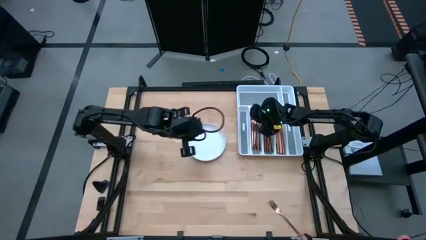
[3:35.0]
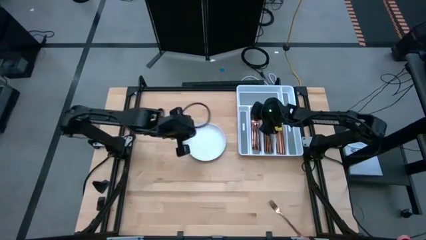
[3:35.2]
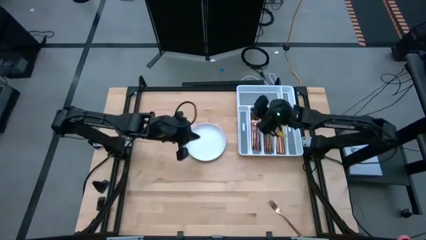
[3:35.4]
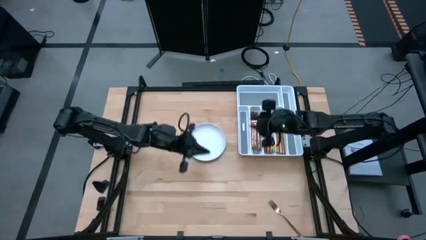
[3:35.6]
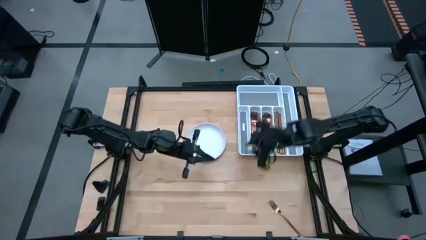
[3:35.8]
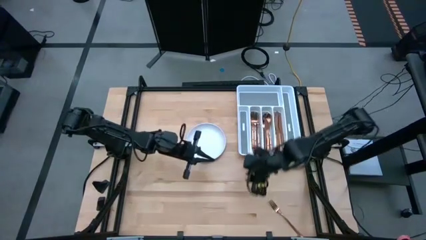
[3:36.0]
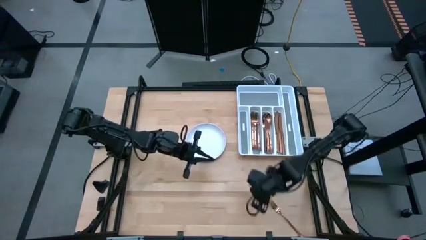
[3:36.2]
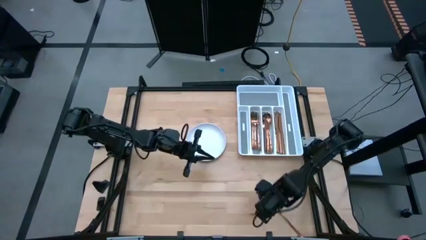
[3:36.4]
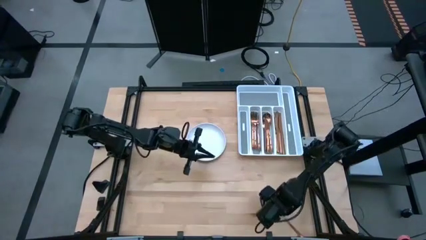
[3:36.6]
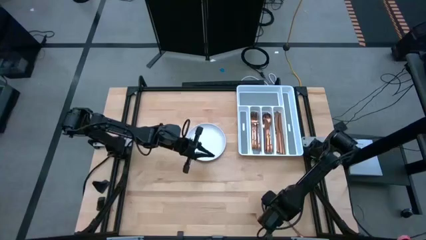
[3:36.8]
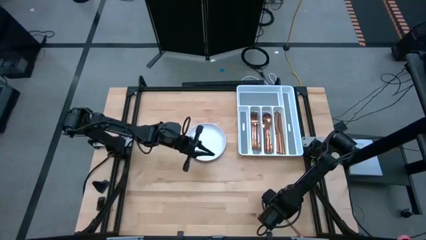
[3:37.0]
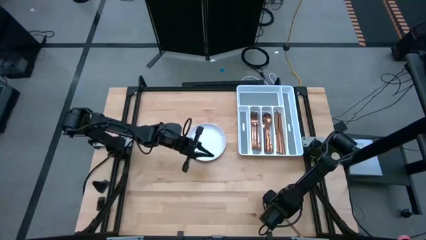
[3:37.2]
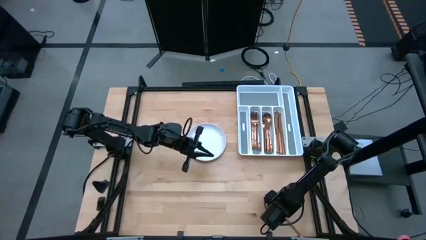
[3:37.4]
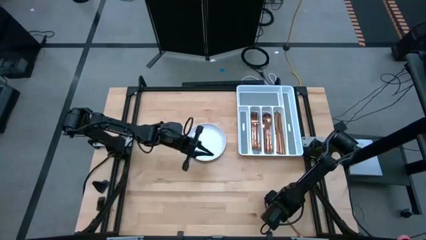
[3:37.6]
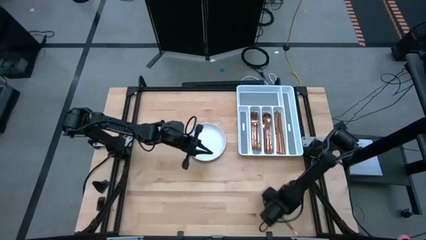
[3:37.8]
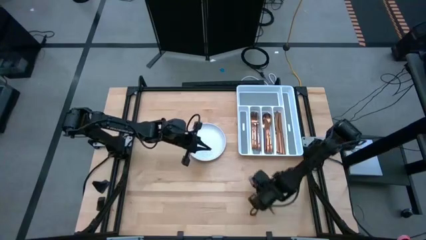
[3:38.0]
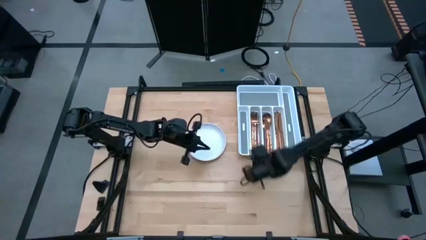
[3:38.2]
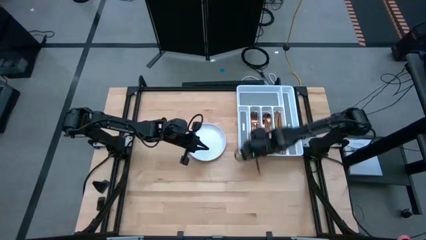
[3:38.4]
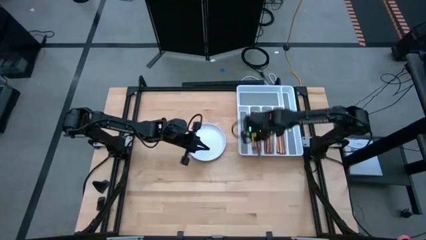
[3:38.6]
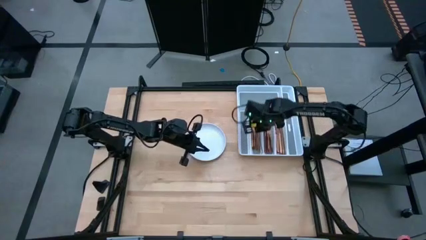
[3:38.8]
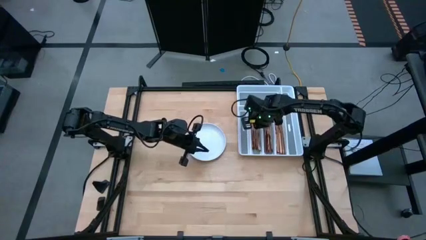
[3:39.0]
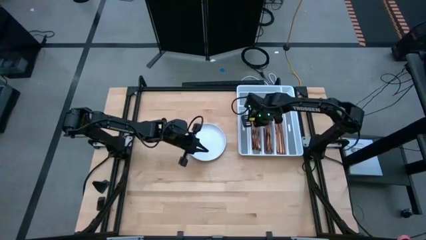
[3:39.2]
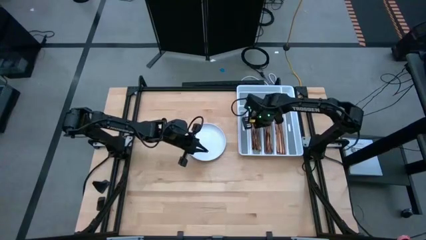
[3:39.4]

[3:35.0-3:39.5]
Task: Sort silverware
Put the fork in the silverware tray

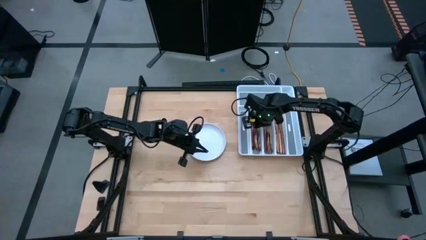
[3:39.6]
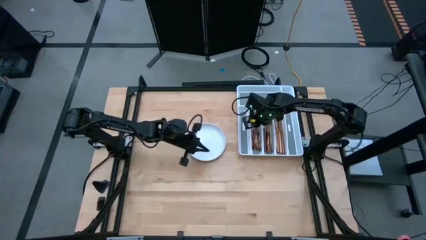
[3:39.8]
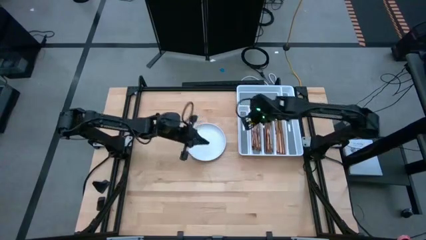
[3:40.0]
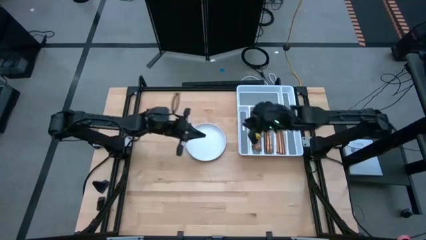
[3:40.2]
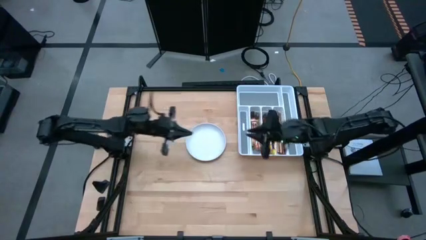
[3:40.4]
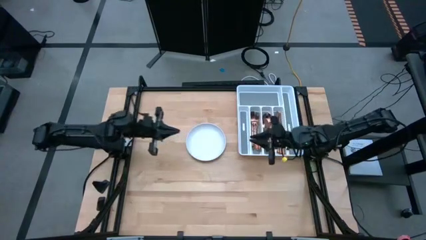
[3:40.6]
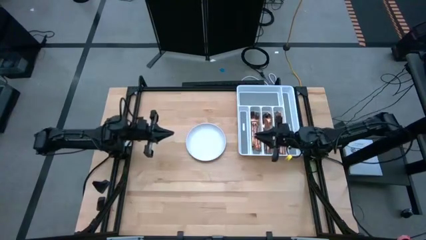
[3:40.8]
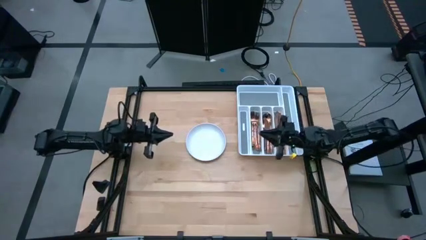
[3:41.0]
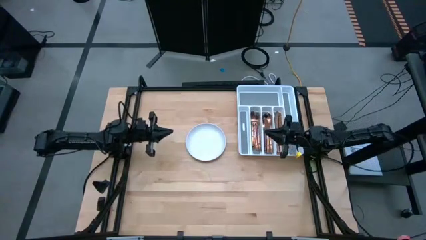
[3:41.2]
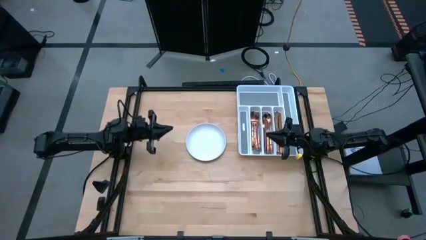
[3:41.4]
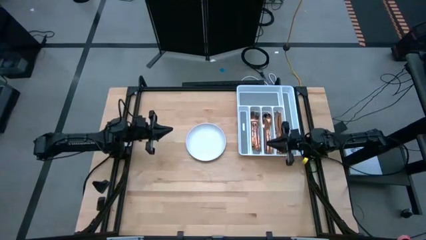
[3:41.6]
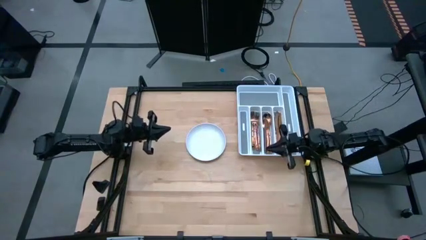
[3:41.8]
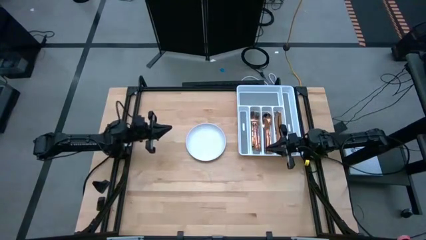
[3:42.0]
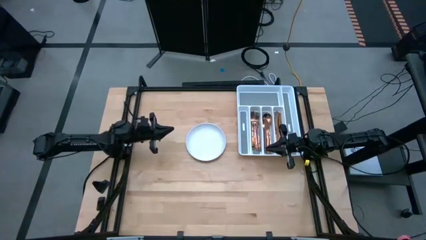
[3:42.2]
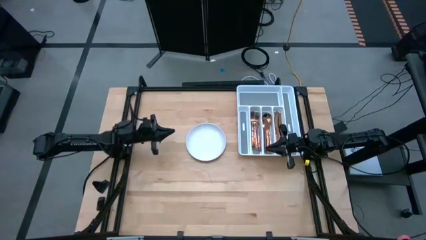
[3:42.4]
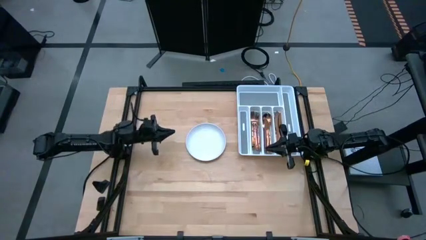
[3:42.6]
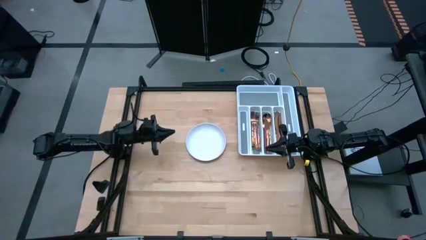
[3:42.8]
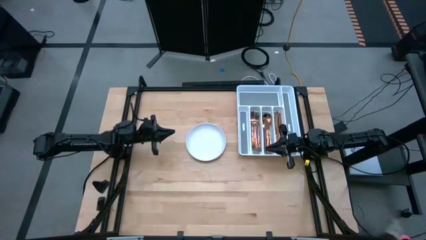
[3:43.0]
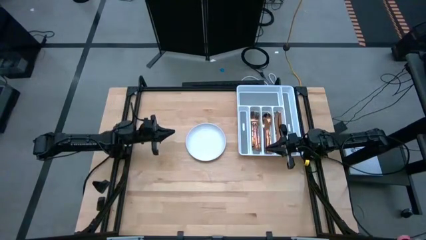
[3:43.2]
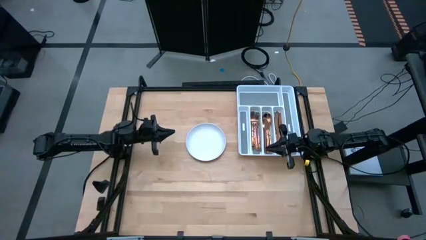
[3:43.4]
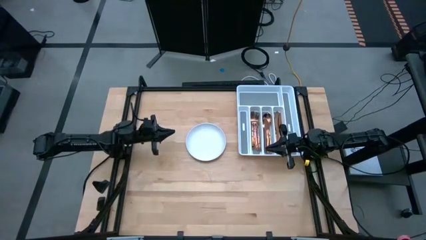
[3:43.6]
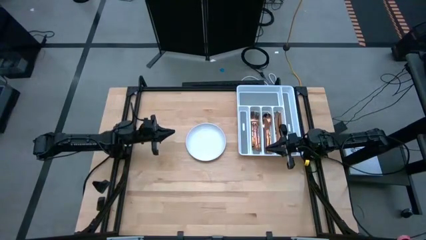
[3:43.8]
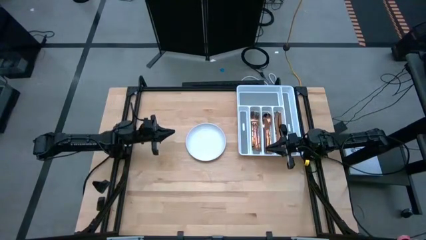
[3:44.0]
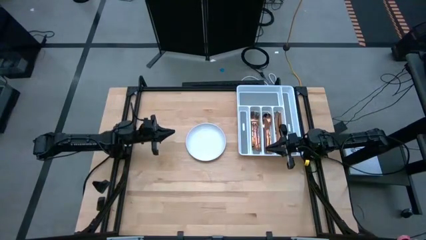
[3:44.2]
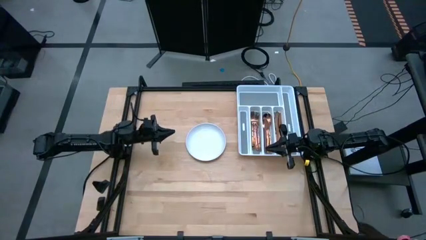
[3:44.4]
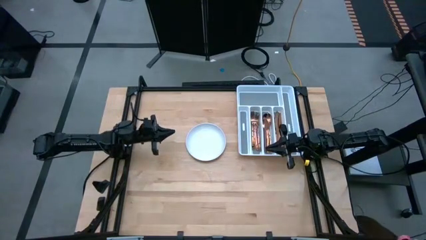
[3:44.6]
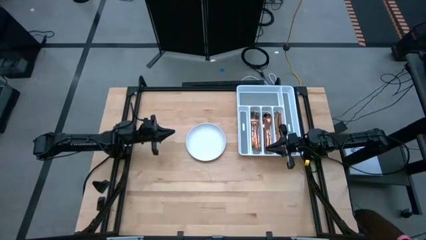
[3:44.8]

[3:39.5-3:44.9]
Return to Home Position

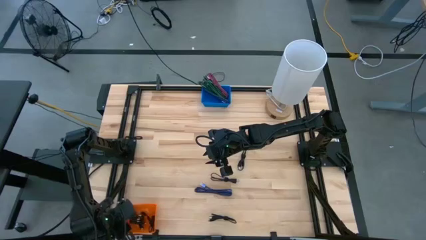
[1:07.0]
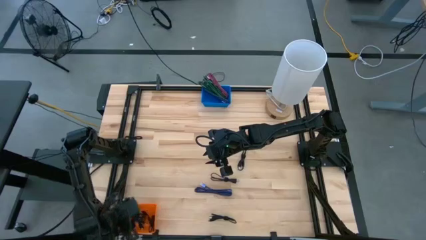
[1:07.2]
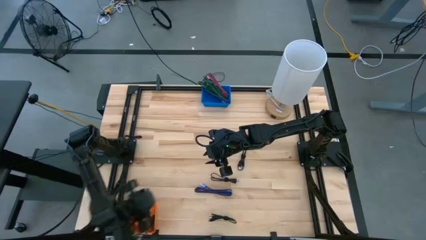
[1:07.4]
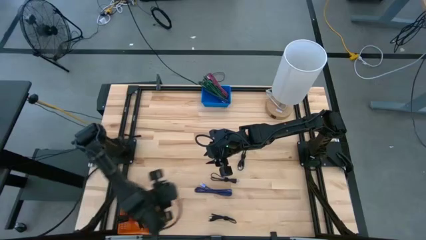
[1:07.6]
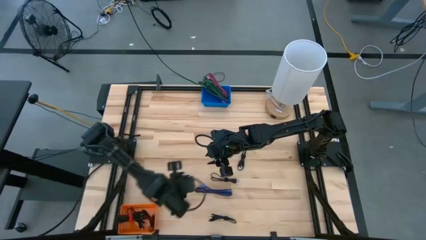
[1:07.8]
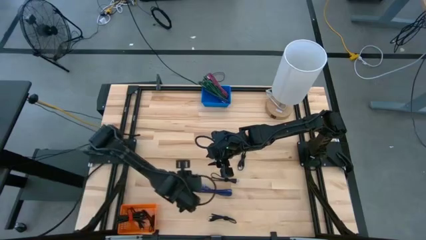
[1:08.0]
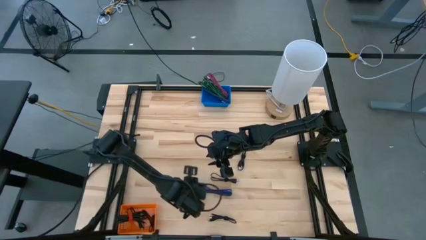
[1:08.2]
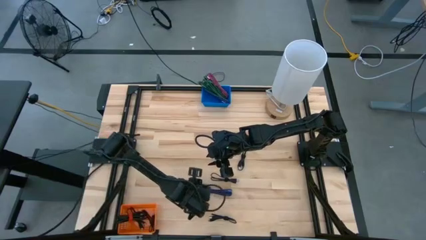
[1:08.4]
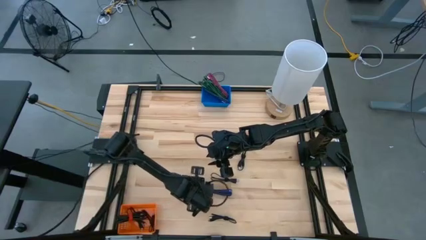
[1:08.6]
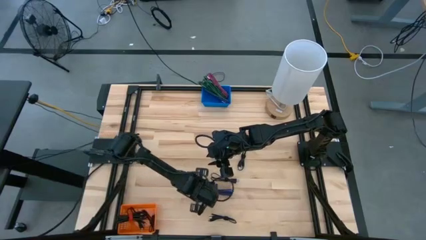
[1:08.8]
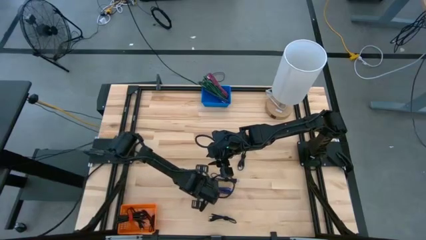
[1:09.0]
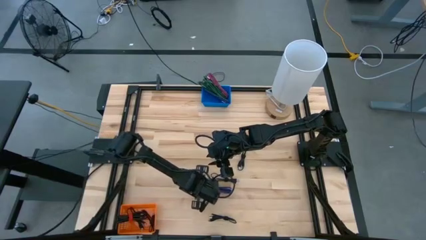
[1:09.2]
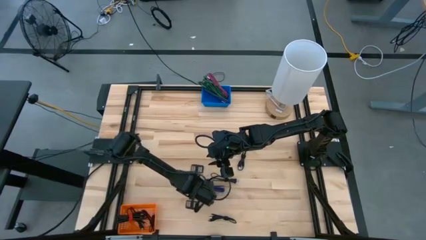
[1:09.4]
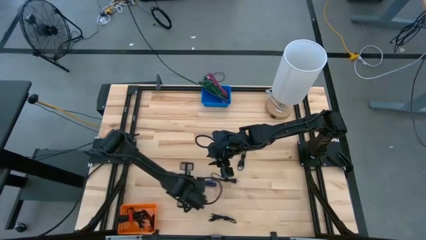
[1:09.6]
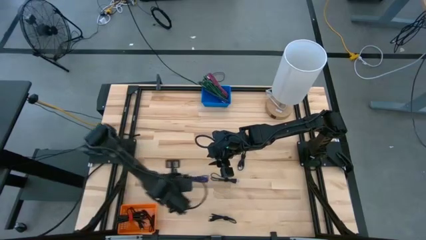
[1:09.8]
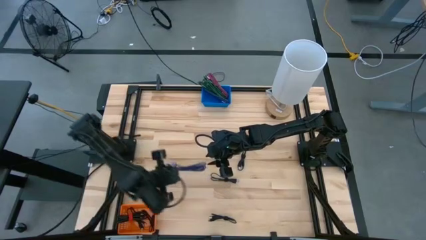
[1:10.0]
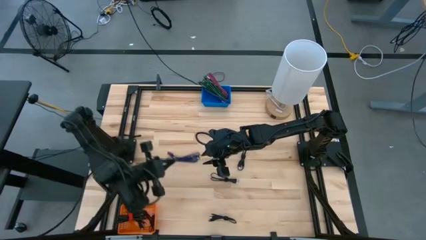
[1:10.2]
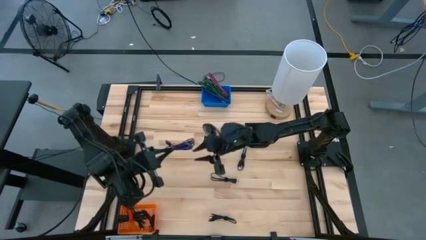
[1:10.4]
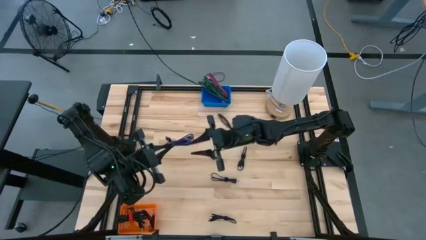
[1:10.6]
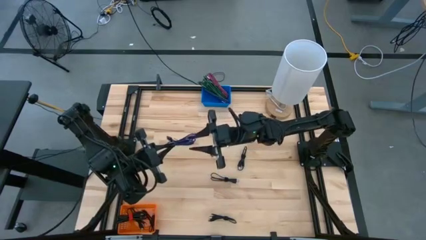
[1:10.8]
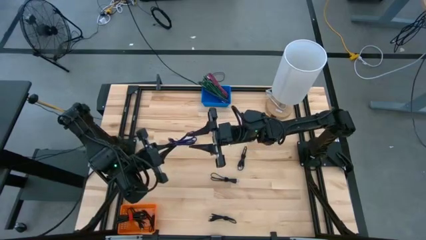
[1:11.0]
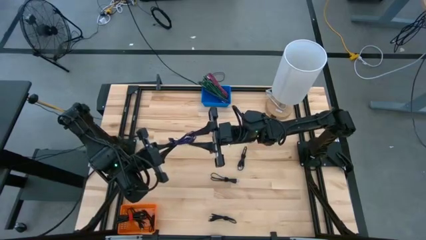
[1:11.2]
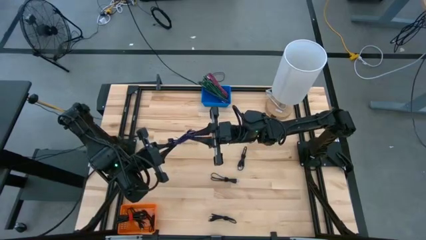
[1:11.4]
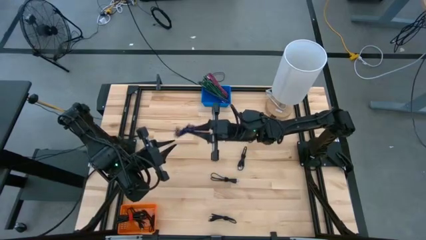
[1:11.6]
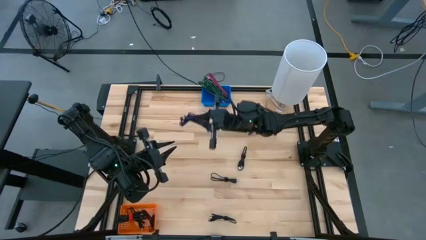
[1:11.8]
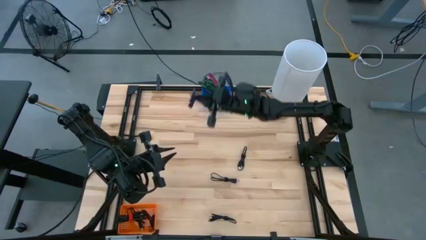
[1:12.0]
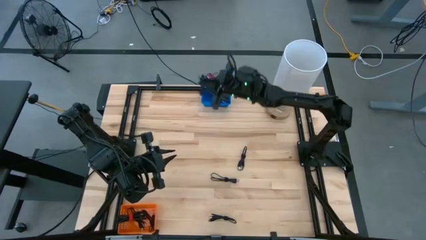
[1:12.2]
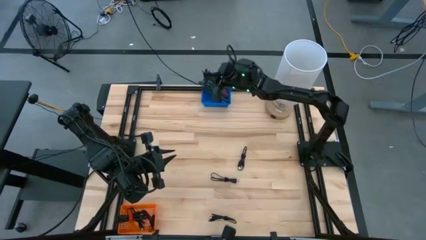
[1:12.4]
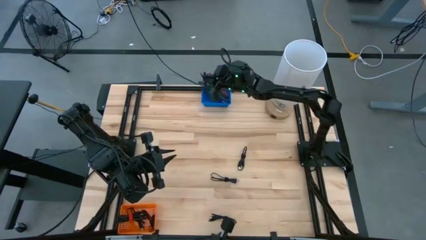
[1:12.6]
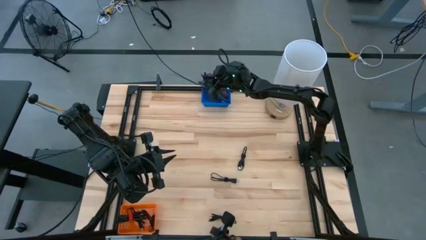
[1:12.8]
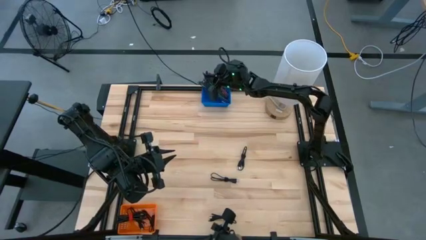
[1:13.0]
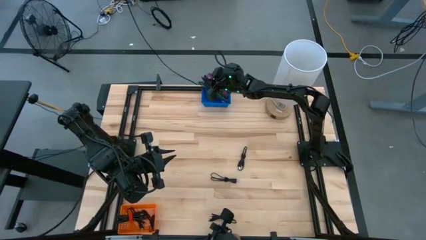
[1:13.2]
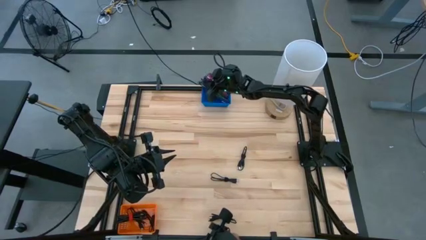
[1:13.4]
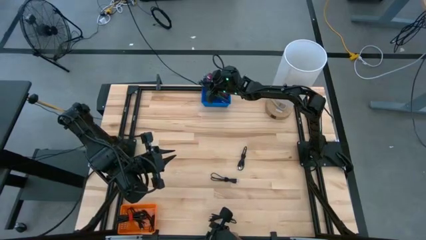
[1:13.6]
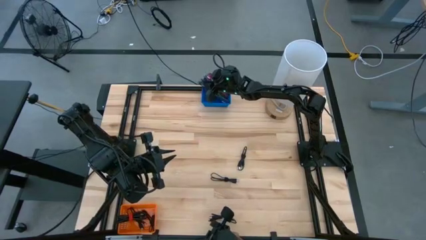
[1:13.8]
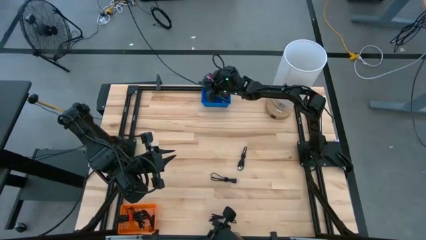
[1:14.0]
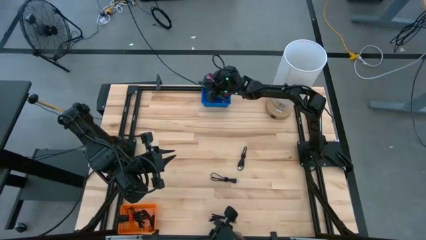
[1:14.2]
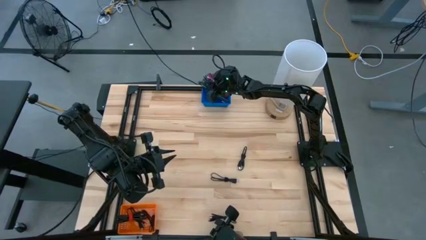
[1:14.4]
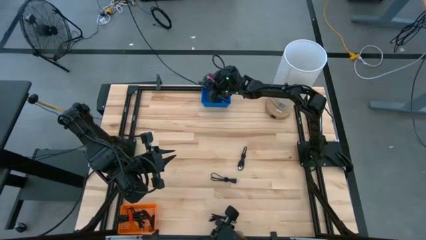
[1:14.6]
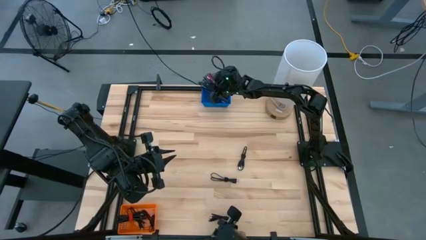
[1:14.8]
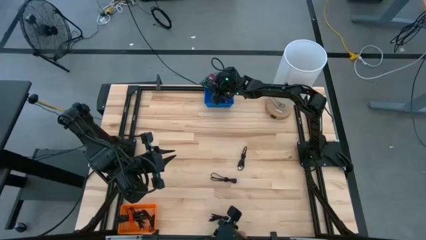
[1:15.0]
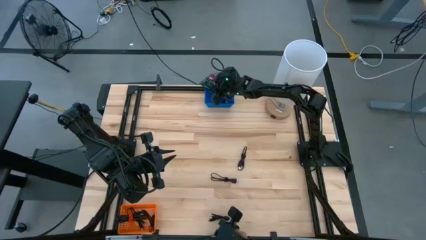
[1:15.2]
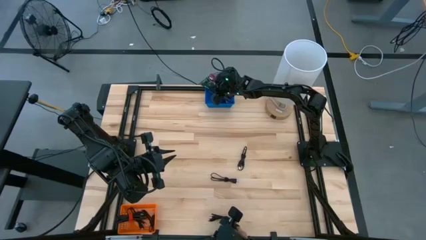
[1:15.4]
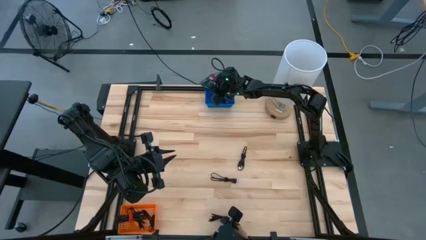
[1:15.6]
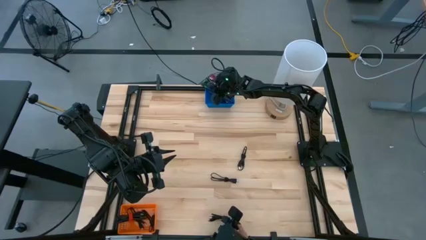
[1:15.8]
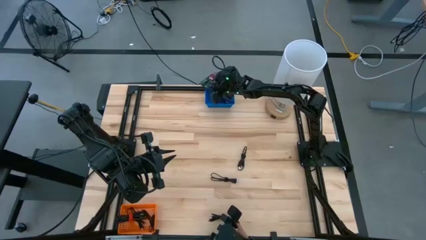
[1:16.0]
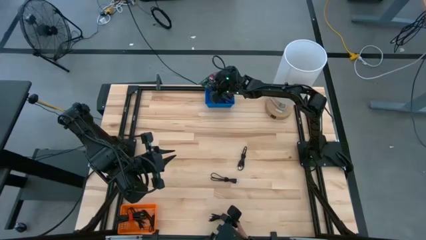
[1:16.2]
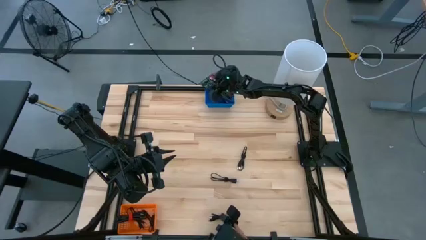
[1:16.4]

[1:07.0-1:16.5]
Task: Pick & Place USB Port
Put the blue charger cable into the blue basket
